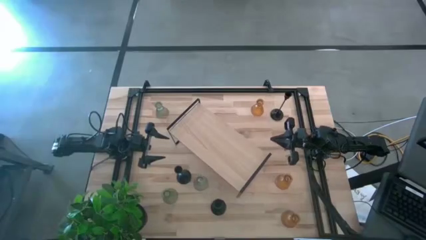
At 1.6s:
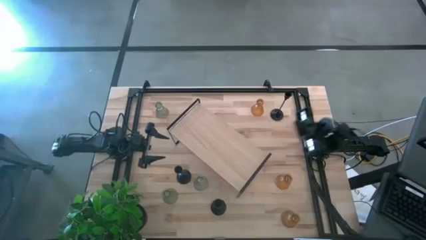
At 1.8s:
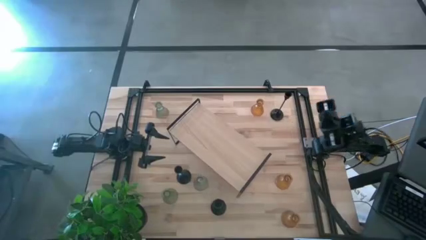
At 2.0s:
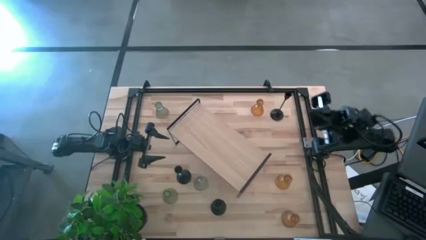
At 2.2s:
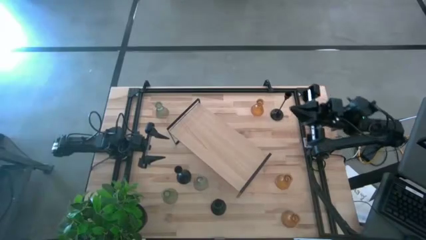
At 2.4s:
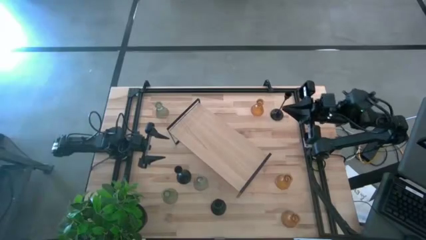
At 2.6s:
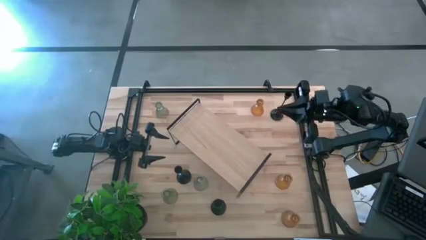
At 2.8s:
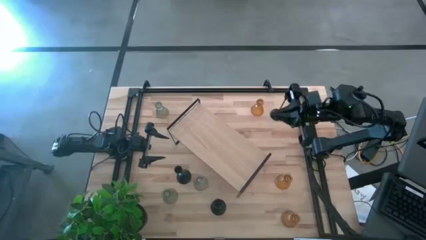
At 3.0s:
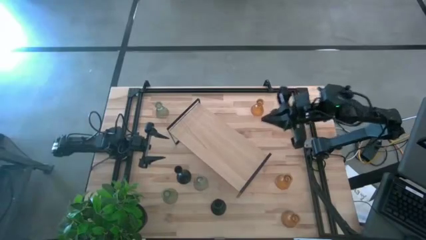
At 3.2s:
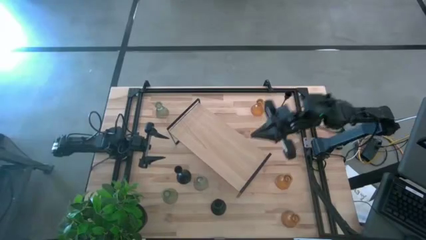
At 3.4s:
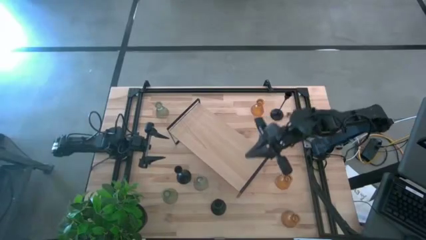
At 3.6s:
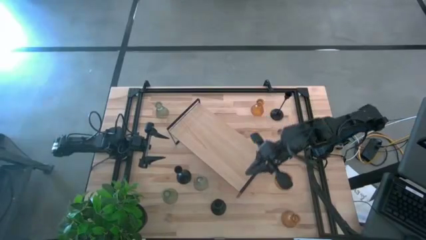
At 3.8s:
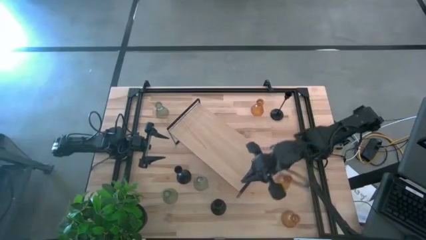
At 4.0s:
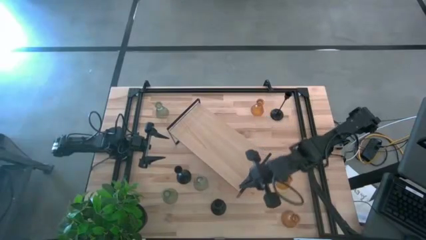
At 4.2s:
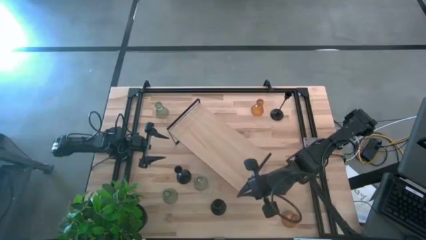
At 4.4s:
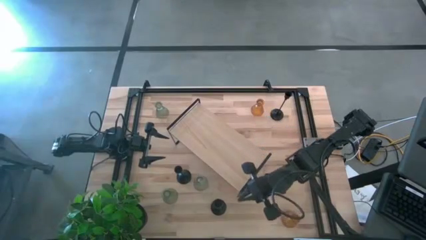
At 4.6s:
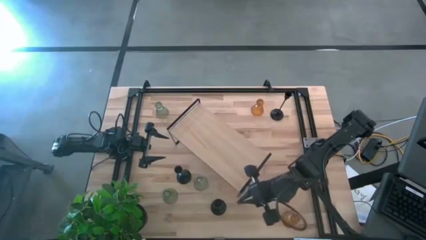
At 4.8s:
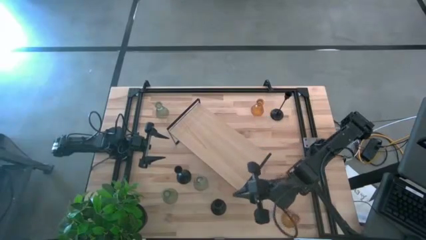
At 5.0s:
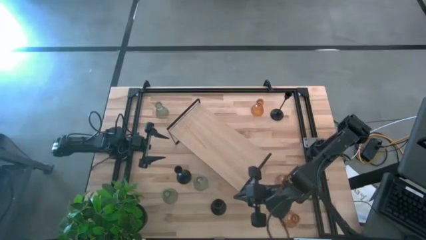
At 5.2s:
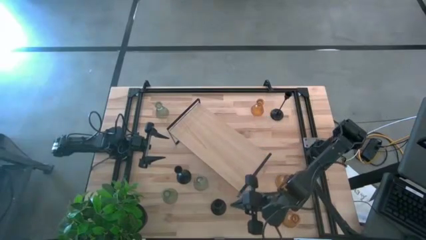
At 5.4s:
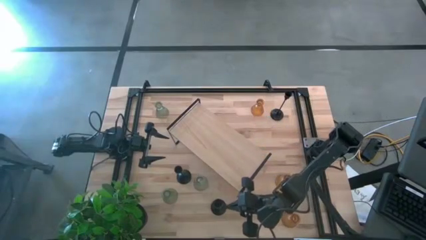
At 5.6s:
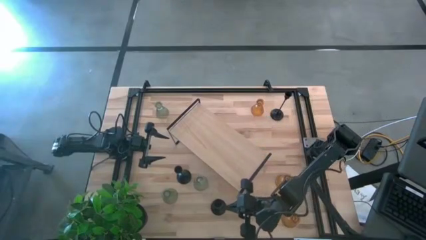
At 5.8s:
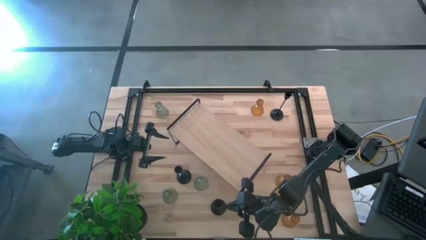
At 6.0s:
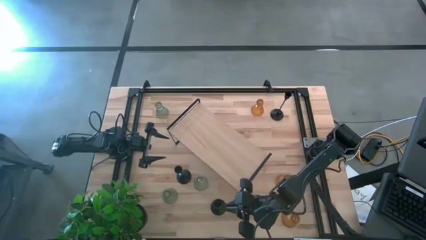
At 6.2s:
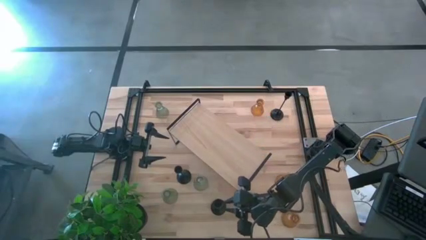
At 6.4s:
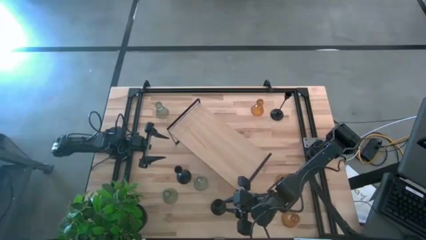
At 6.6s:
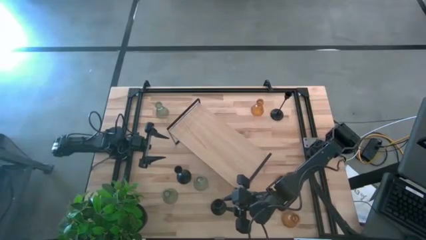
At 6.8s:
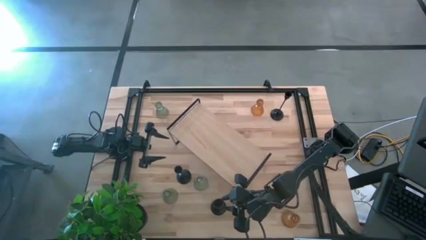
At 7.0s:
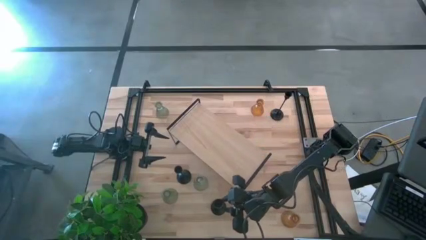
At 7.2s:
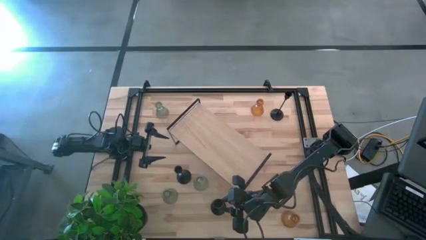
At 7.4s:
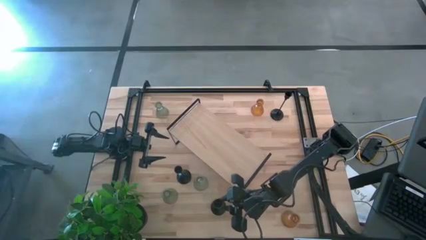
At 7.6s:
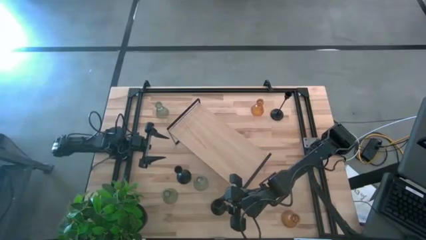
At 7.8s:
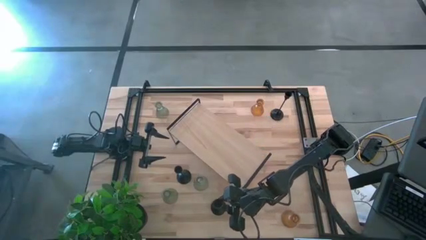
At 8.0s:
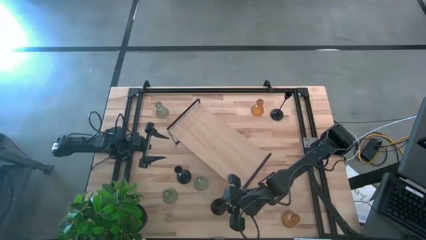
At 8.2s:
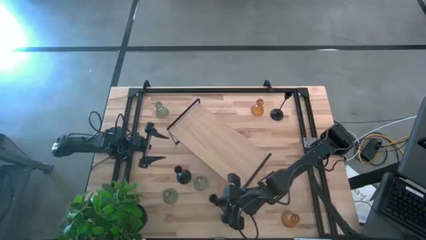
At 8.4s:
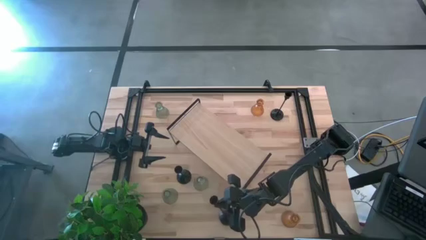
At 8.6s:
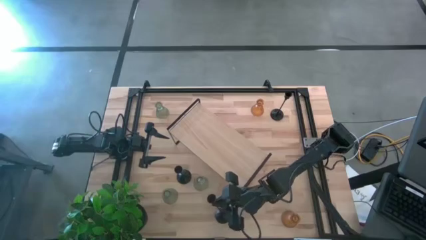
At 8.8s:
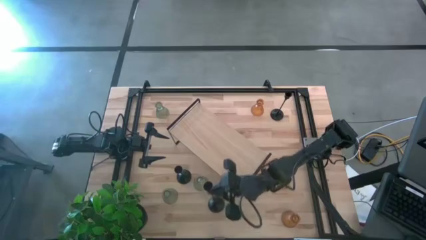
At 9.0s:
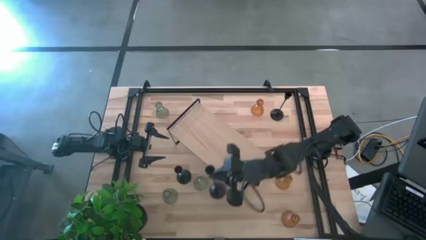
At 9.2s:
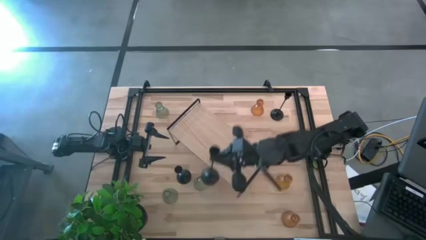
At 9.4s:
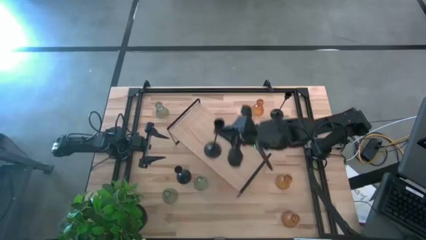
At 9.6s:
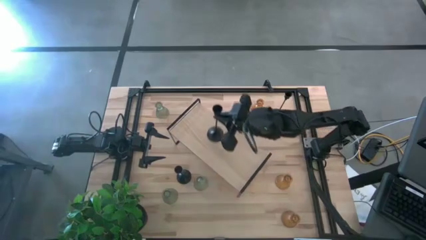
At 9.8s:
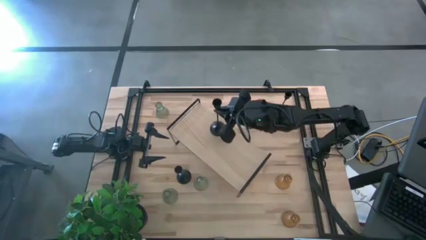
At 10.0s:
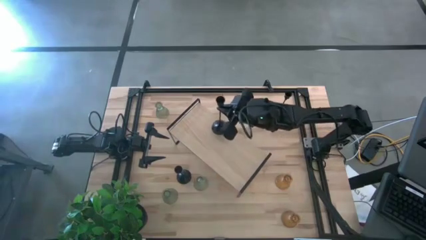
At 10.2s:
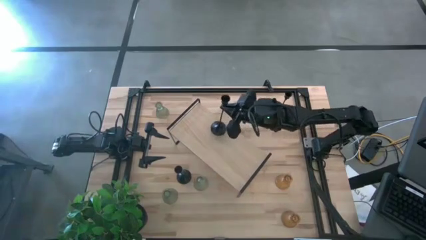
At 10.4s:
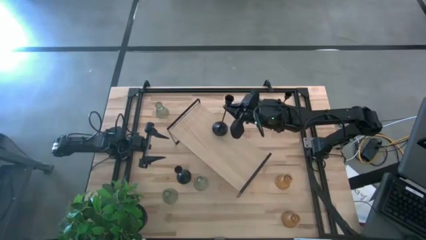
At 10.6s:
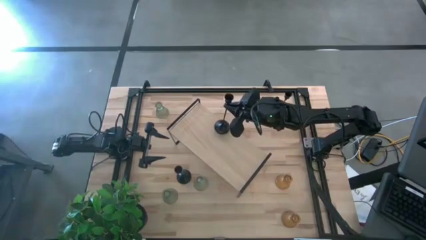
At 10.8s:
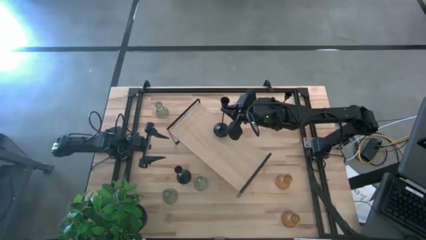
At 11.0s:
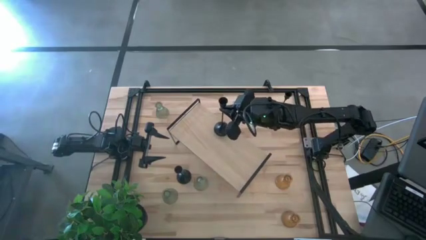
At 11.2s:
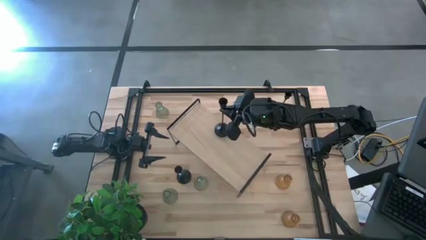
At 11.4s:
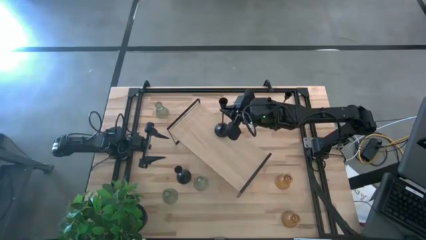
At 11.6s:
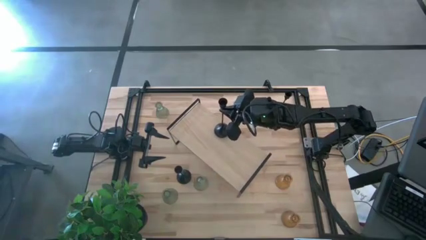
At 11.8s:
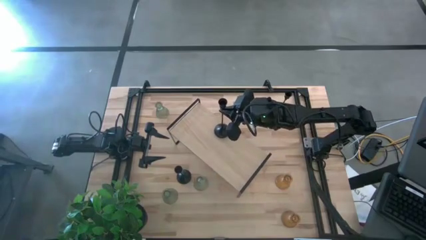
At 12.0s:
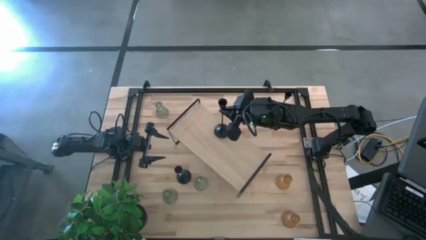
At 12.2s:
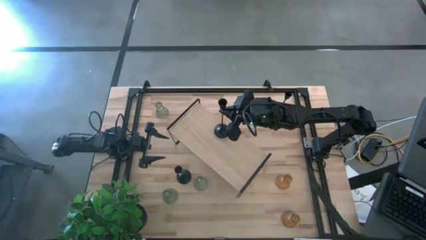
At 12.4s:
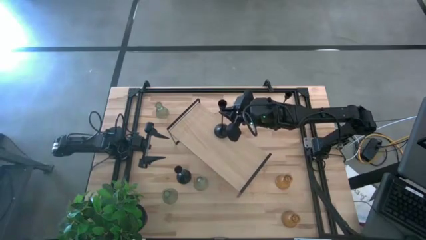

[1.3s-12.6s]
Task: Pick & Place candle stick holders
Put the bottom black candle holder on the shelf
